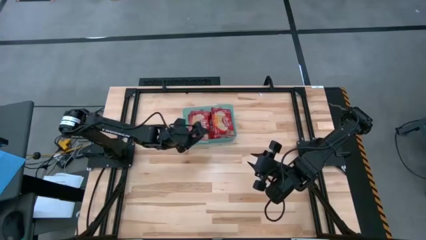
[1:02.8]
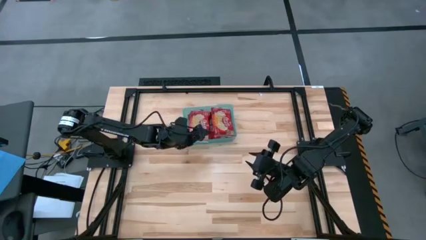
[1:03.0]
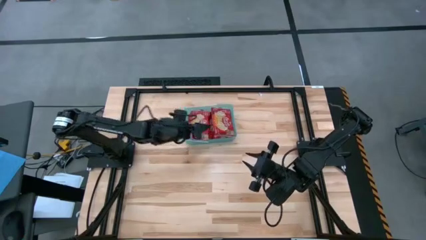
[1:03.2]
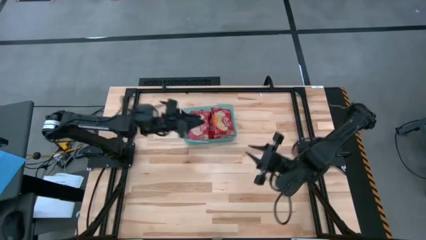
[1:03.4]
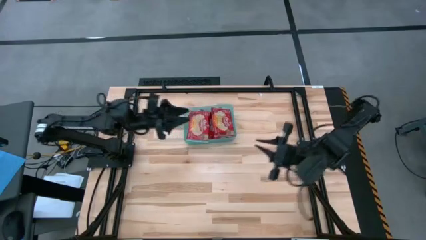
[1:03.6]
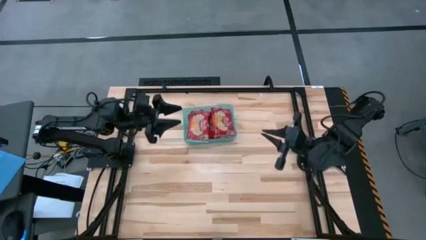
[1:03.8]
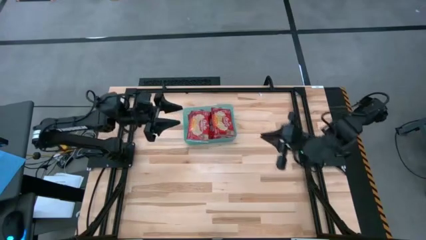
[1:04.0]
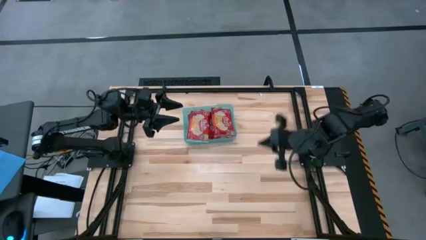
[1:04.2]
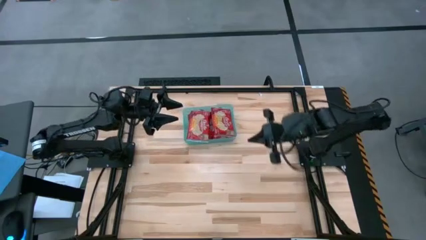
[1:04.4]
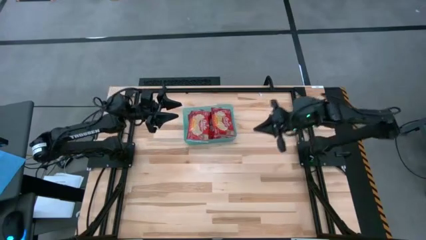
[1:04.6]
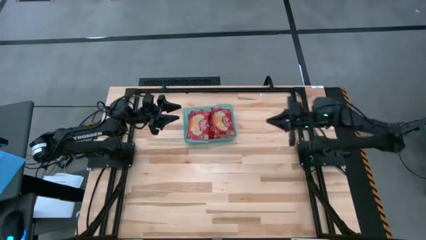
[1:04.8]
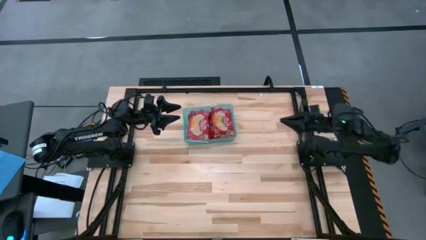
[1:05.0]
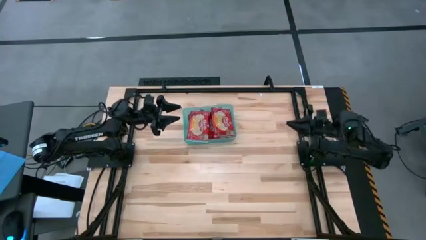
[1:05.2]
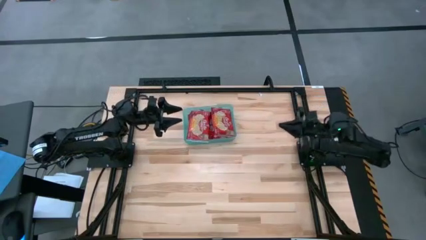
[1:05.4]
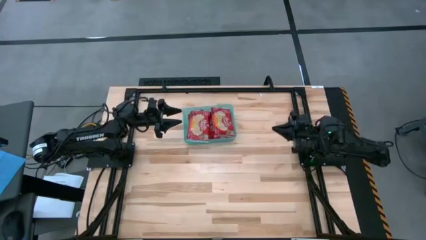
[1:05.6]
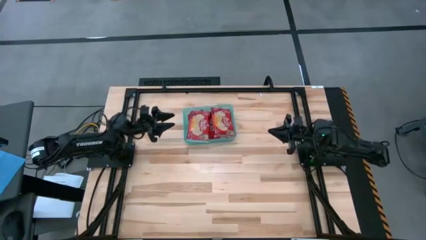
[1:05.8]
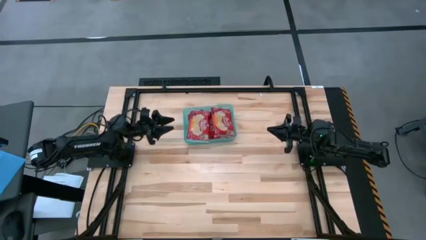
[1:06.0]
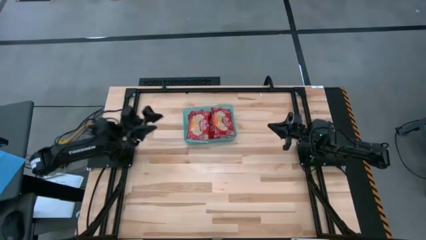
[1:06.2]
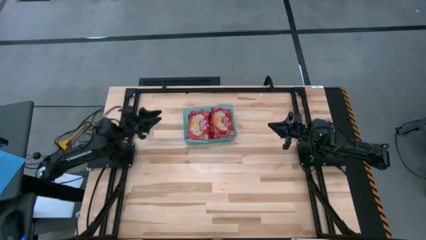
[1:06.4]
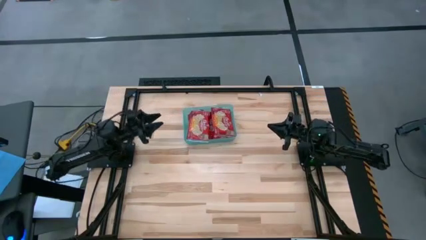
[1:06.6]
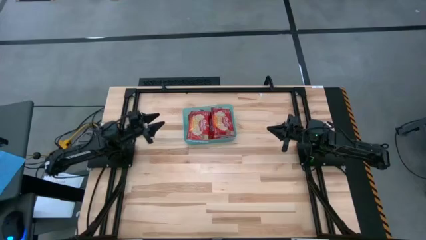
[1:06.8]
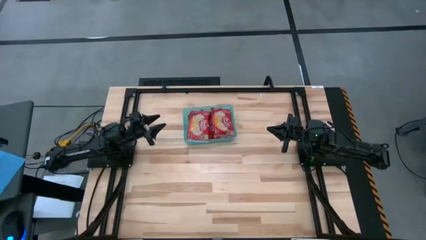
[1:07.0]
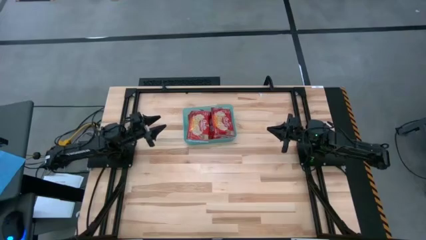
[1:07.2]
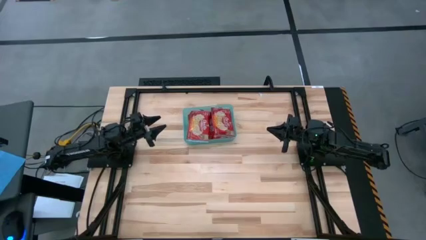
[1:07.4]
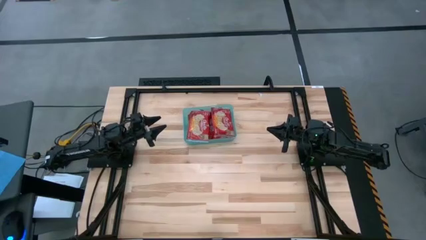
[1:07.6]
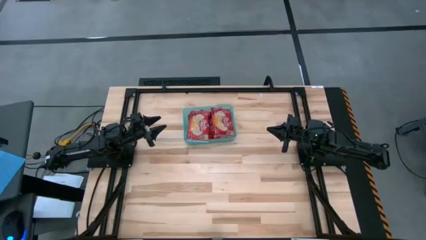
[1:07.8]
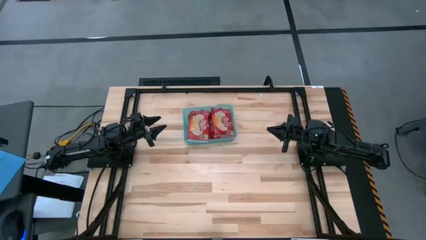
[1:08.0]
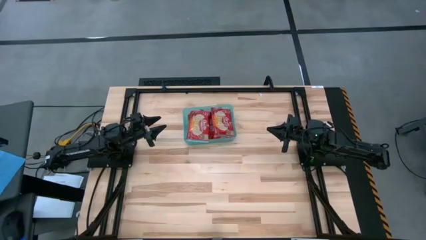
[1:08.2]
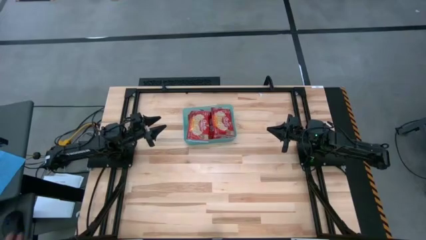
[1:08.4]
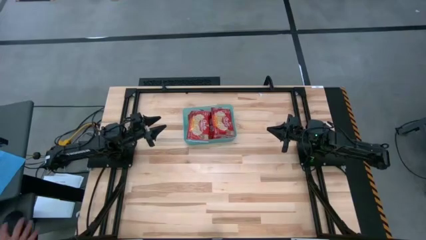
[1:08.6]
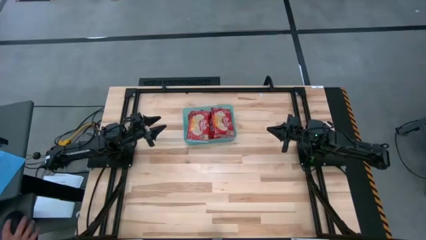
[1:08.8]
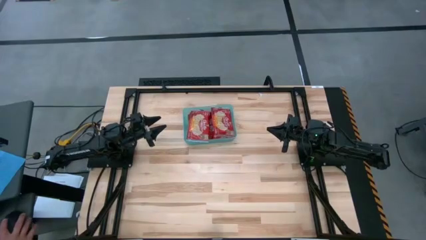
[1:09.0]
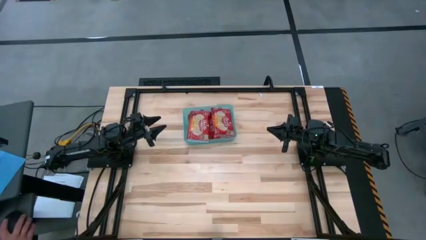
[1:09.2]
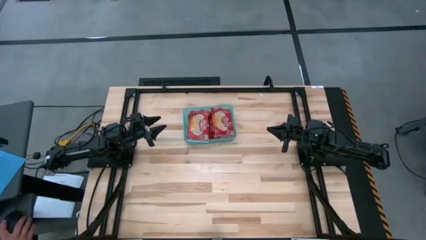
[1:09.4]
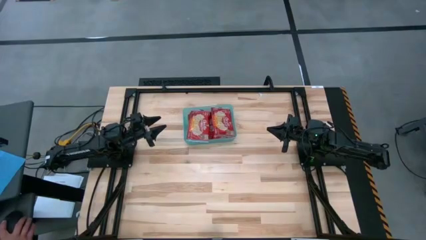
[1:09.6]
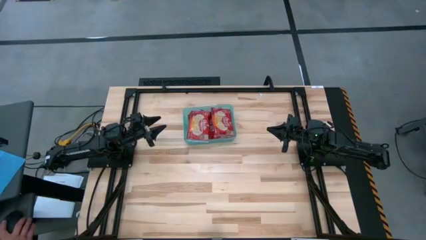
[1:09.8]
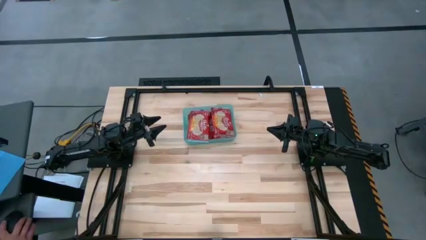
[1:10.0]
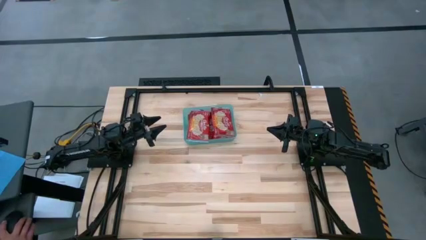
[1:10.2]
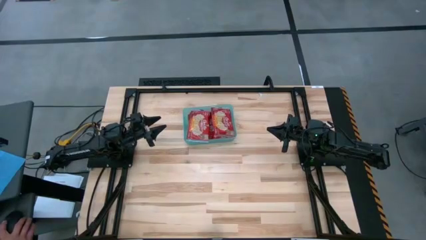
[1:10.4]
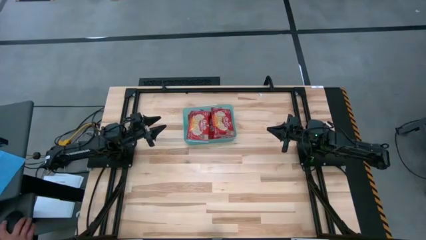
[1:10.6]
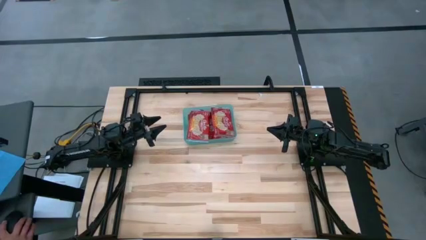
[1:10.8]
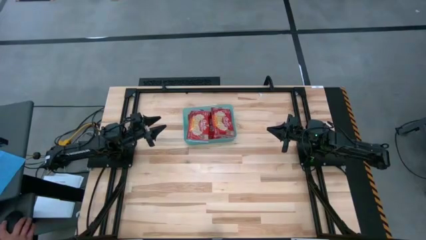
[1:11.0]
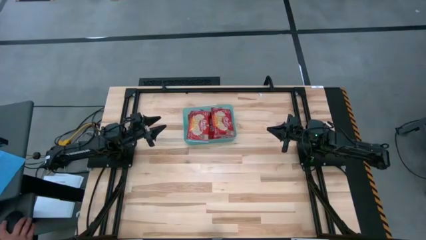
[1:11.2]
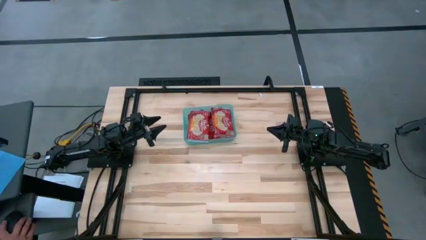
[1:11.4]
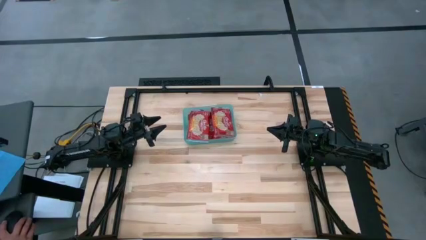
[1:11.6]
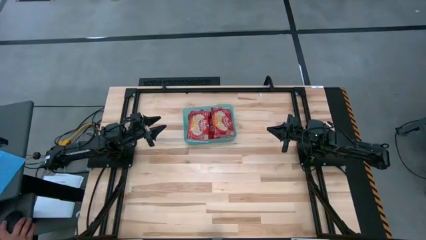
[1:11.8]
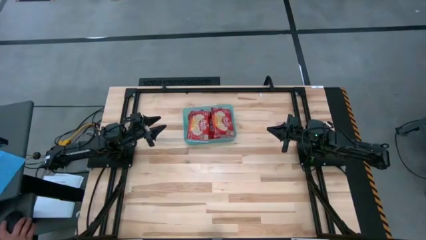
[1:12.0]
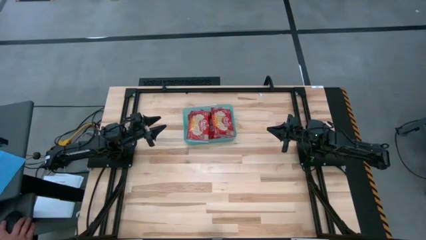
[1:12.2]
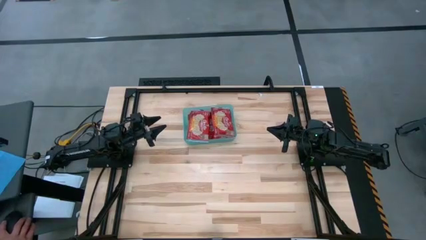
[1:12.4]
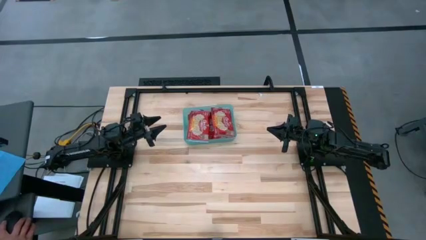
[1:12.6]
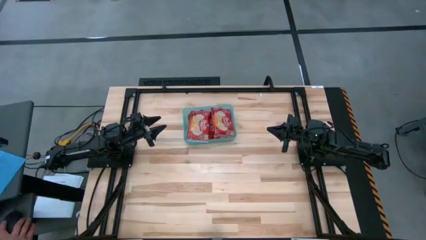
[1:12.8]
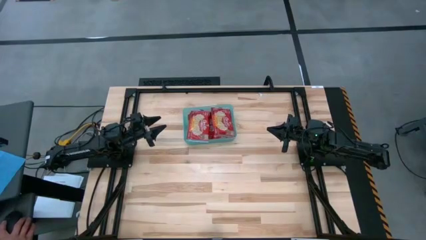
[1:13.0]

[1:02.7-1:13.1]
Task: Sort popcorn bags into baskets
Return to Home Position

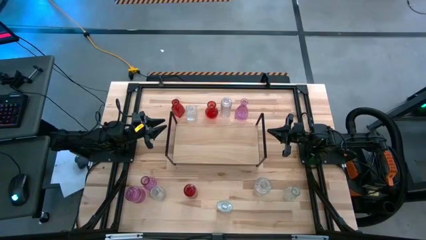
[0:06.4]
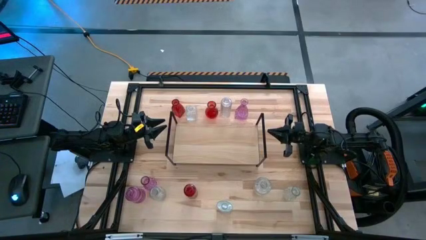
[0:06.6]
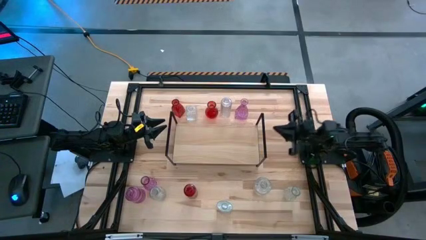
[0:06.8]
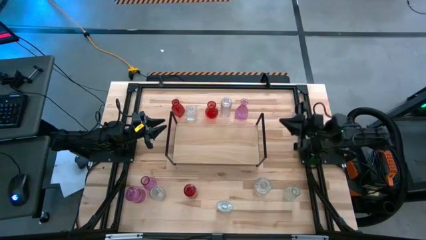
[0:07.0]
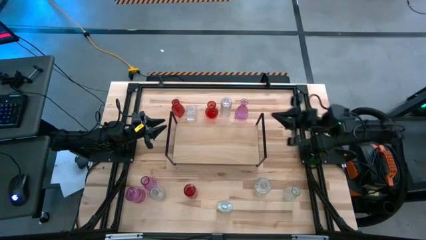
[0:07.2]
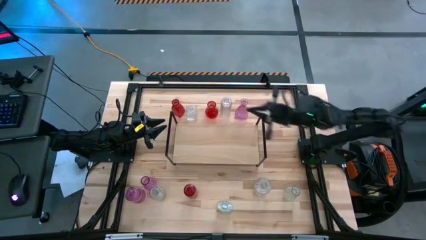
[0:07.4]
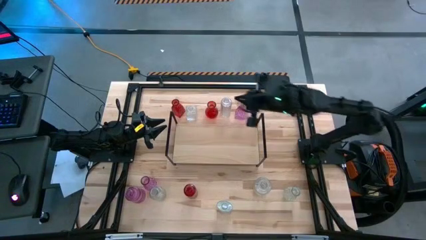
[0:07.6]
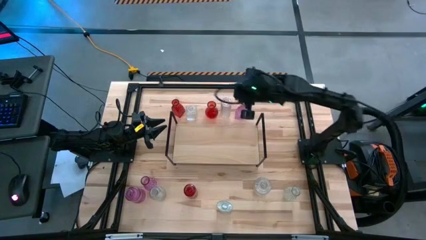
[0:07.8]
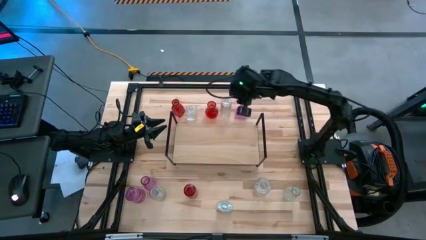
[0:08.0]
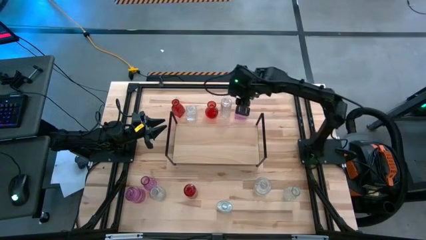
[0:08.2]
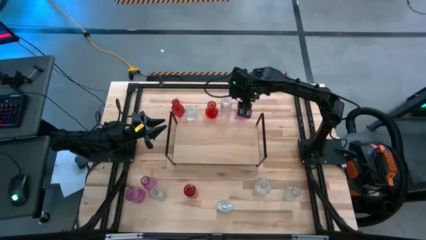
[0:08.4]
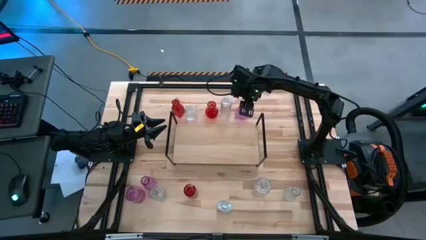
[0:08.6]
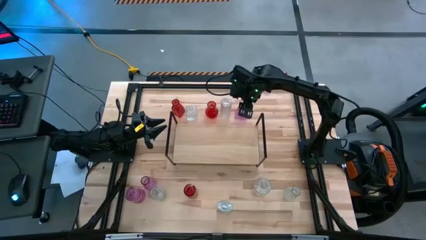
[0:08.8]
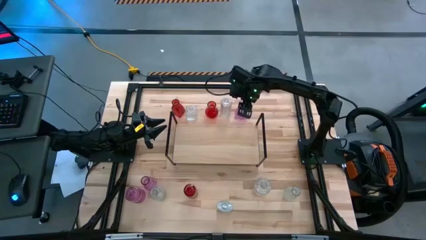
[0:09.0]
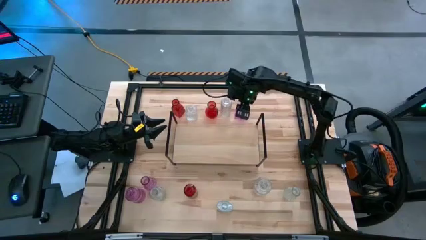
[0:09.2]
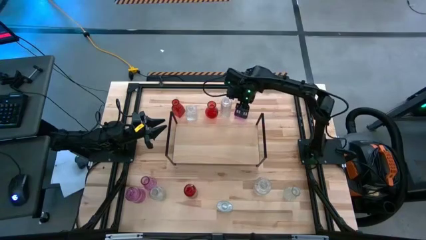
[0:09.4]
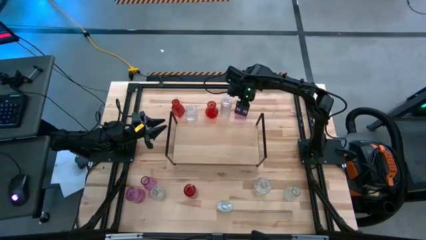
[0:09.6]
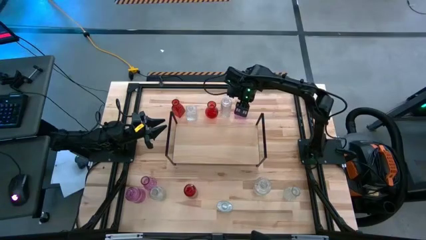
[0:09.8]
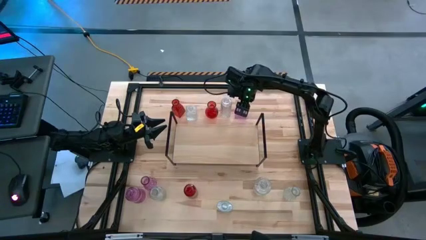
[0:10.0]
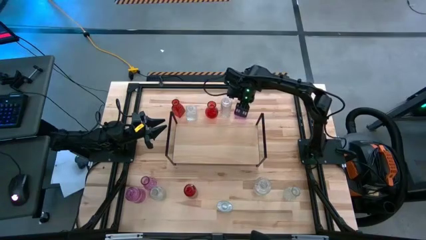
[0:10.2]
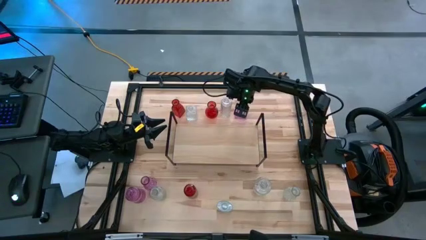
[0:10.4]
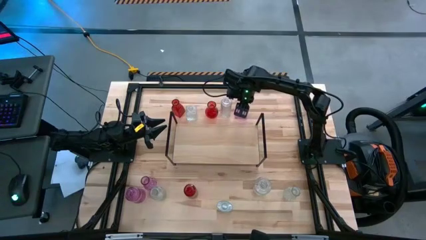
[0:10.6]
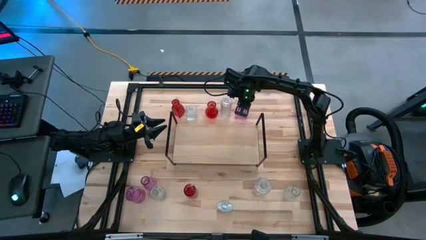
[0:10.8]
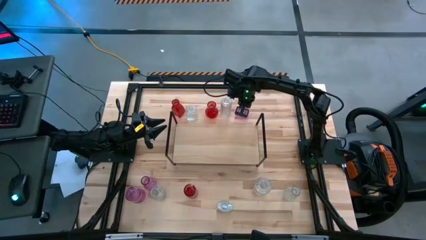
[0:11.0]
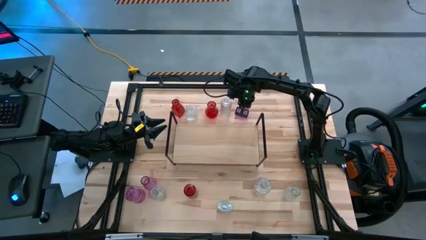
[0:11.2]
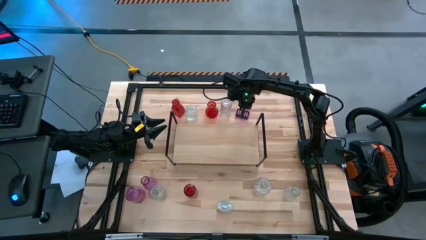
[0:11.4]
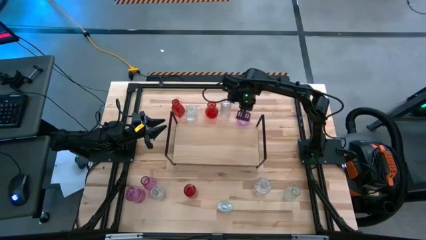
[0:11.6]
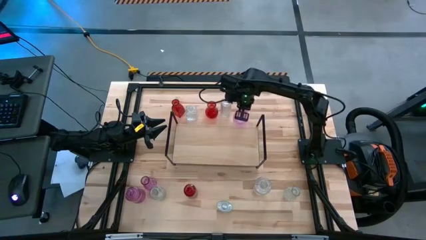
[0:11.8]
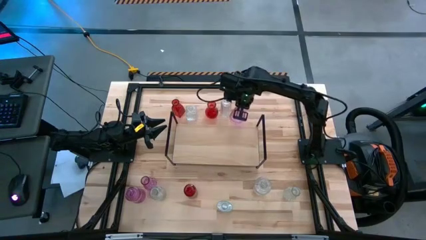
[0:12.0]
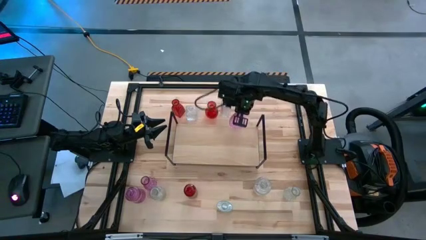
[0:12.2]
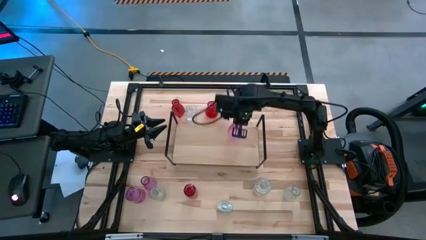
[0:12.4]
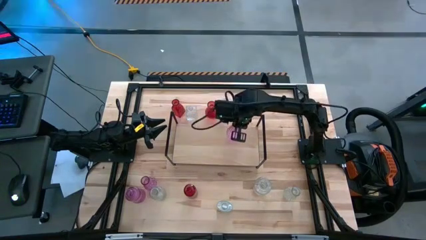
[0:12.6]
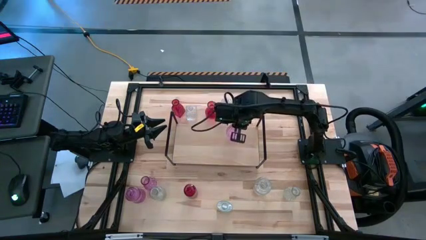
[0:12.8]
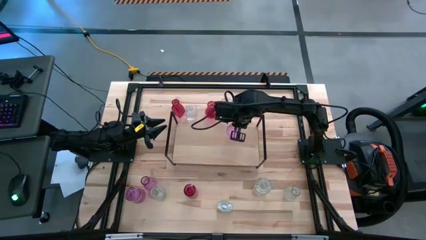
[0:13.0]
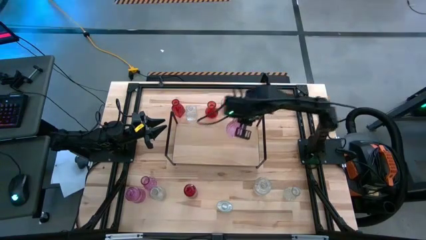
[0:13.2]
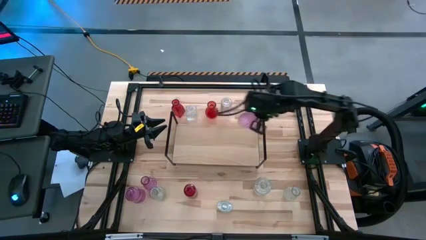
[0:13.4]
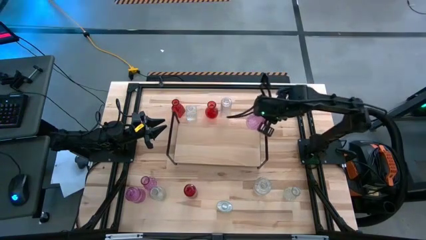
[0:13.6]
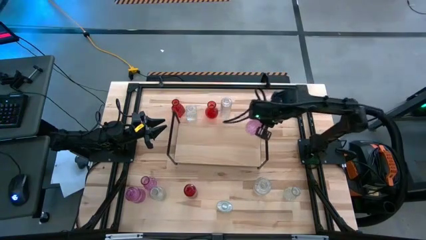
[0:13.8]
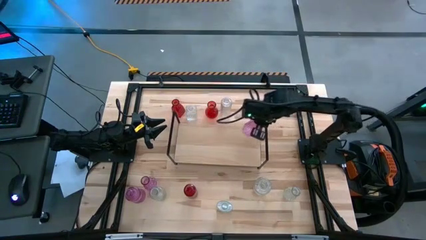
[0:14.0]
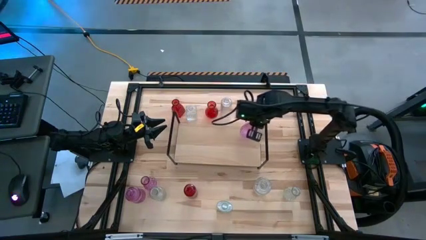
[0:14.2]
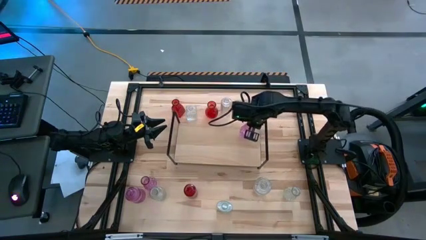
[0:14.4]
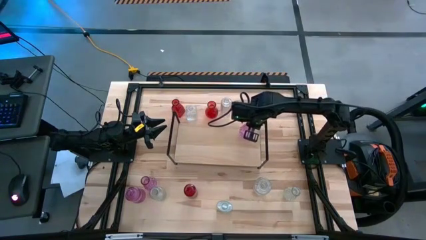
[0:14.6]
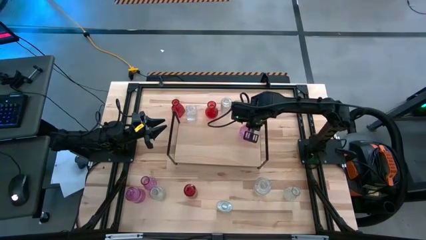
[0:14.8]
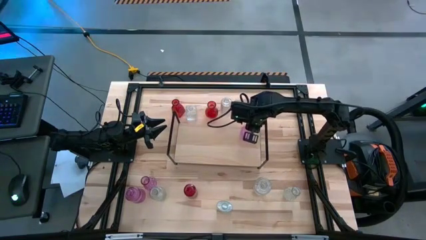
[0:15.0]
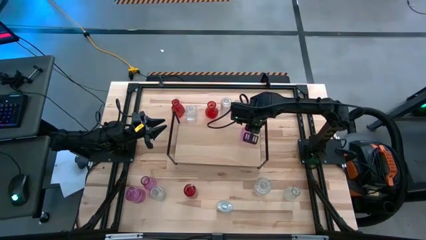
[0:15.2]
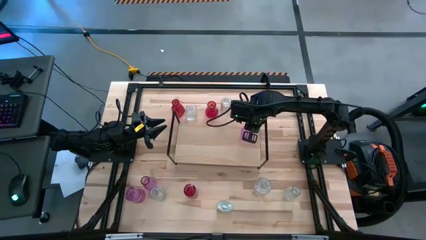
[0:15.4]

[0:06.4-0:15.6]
Task: sort vases onto shelf
Put the pink transparent vase on the shelf
